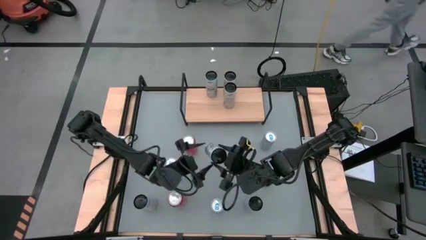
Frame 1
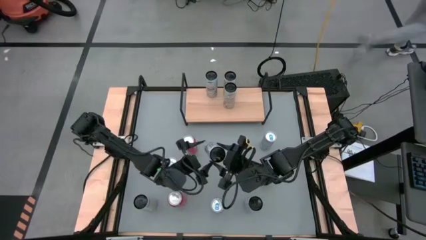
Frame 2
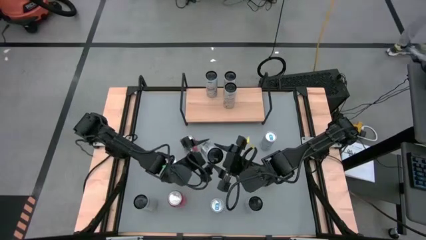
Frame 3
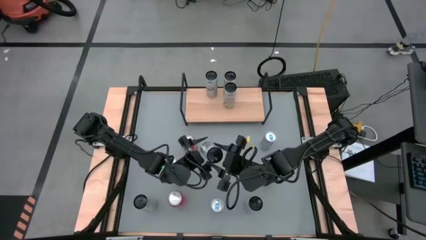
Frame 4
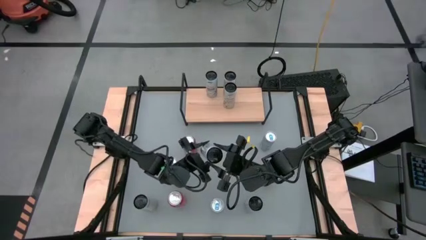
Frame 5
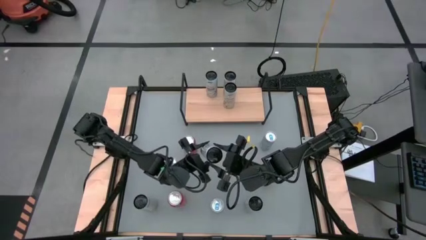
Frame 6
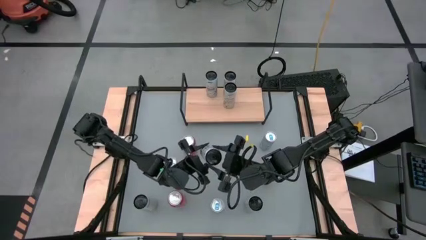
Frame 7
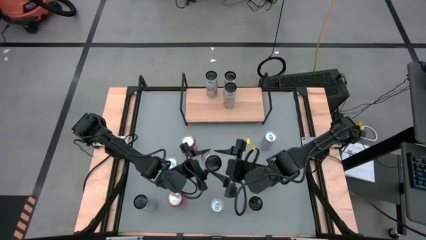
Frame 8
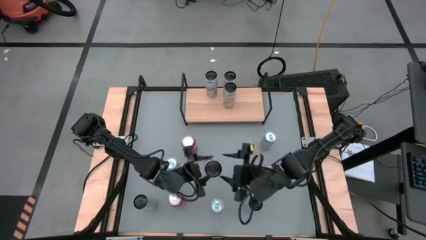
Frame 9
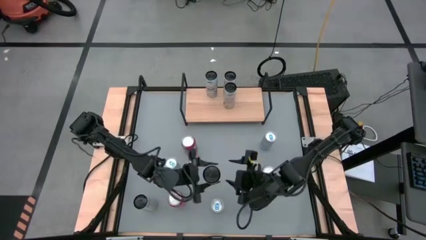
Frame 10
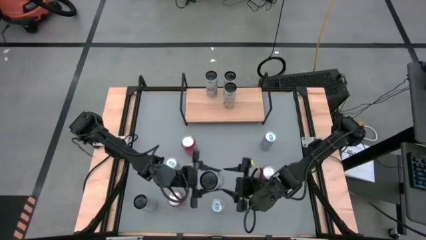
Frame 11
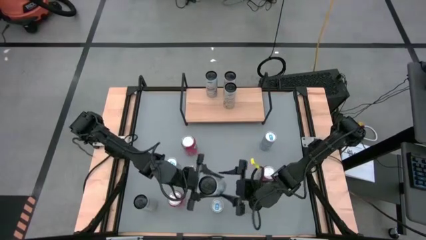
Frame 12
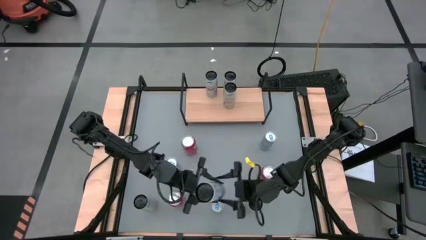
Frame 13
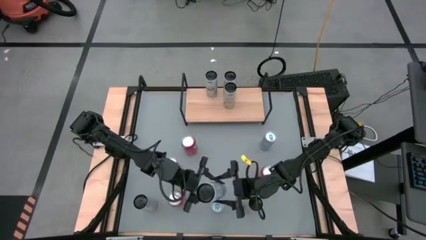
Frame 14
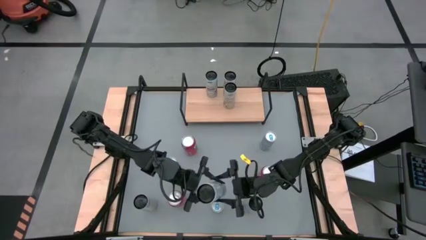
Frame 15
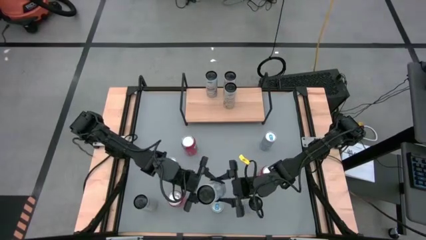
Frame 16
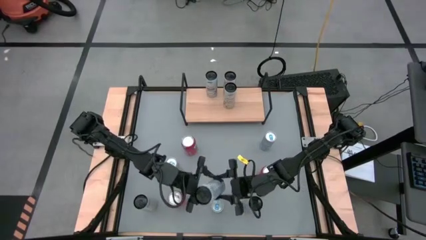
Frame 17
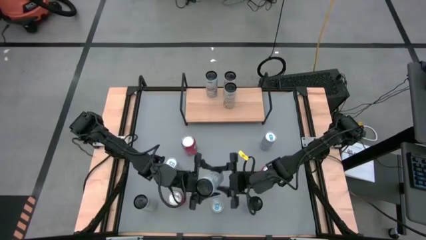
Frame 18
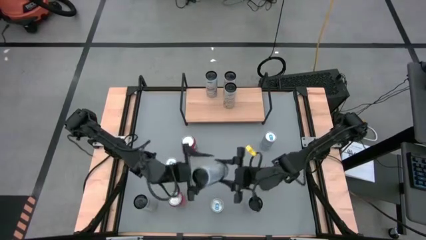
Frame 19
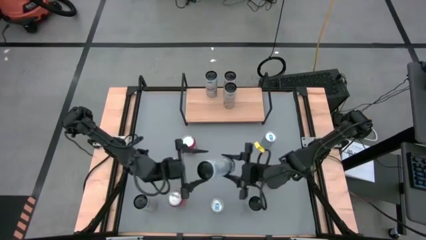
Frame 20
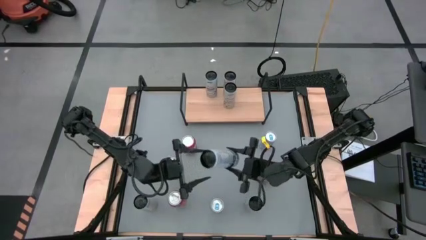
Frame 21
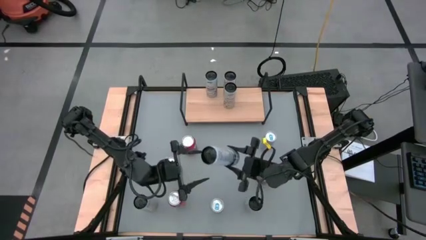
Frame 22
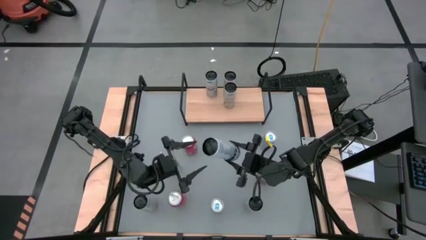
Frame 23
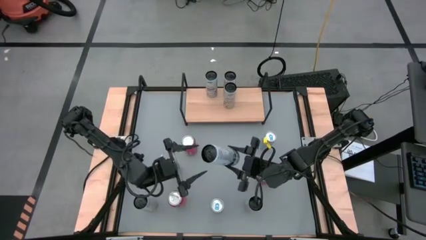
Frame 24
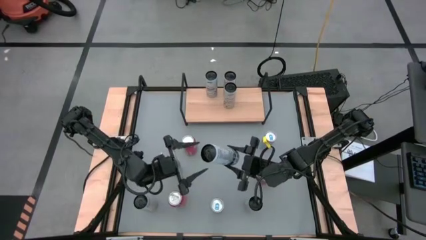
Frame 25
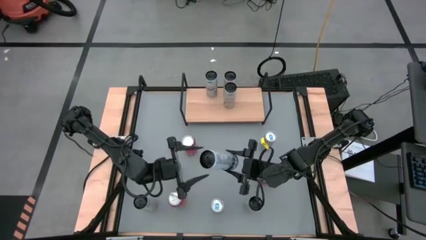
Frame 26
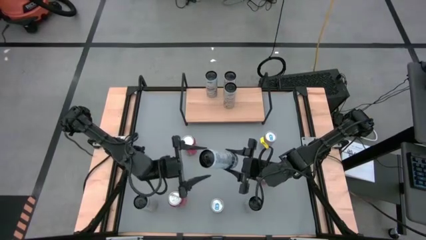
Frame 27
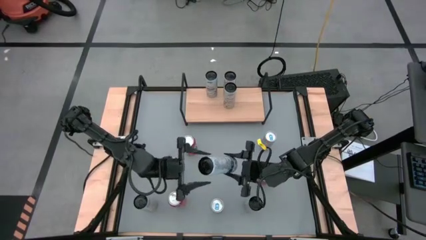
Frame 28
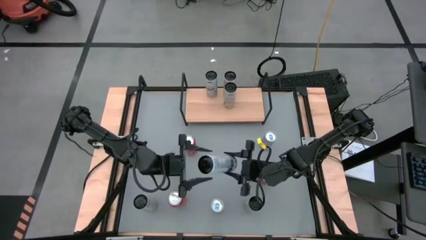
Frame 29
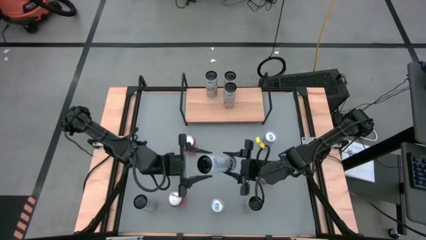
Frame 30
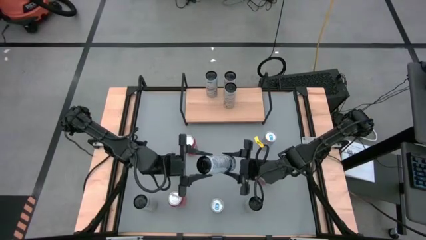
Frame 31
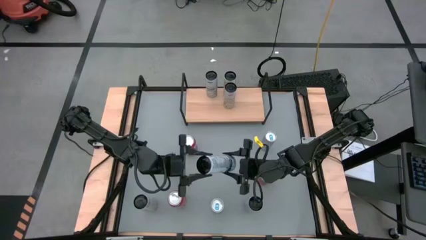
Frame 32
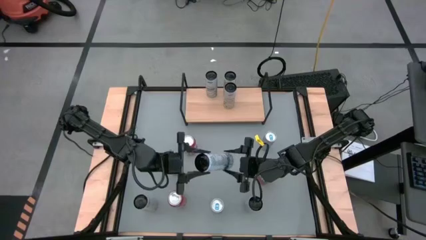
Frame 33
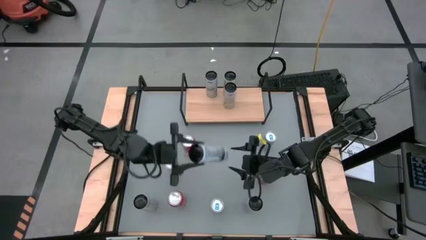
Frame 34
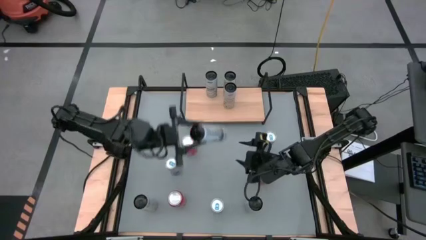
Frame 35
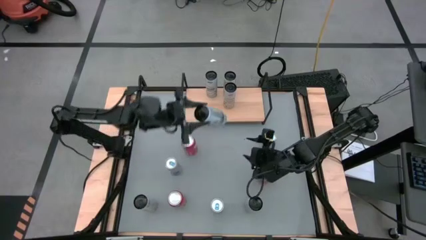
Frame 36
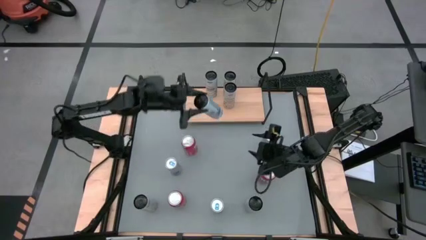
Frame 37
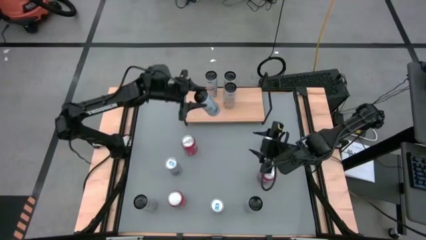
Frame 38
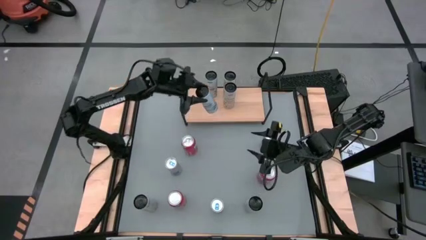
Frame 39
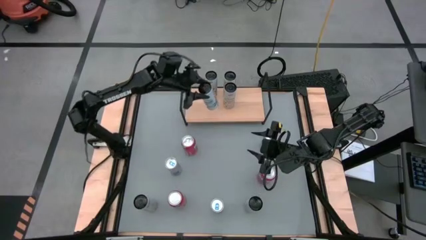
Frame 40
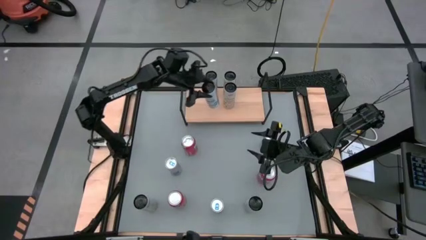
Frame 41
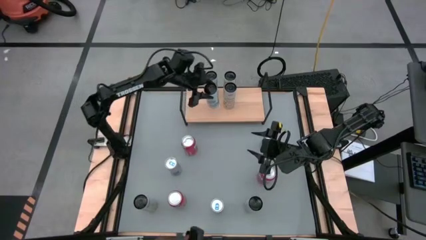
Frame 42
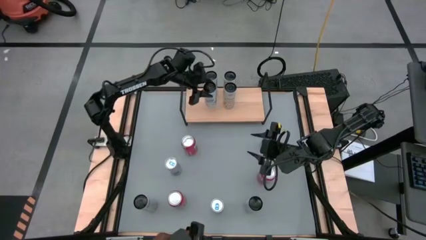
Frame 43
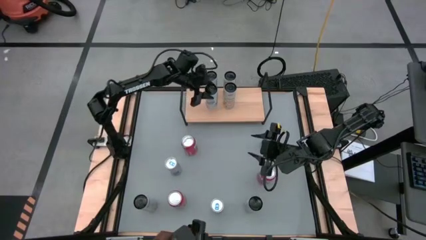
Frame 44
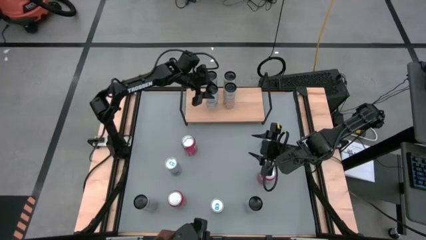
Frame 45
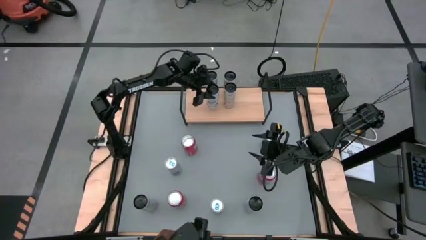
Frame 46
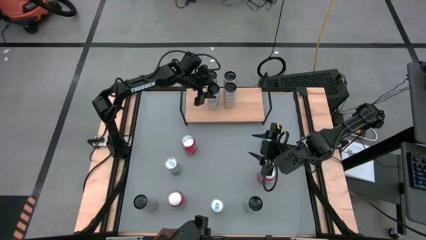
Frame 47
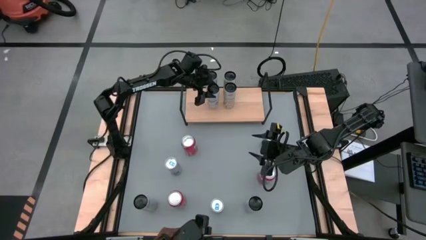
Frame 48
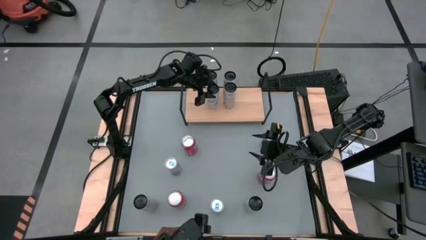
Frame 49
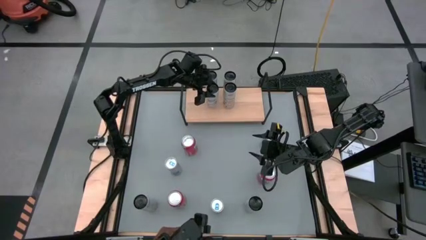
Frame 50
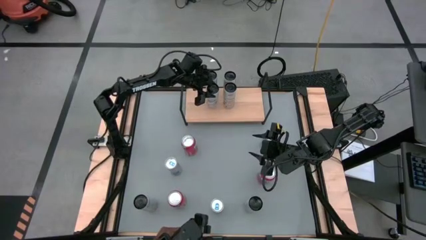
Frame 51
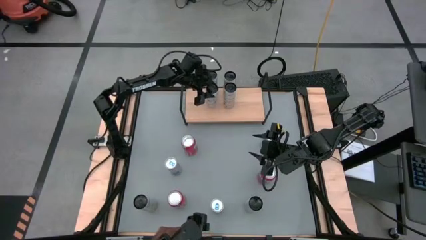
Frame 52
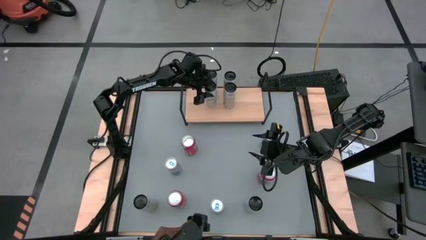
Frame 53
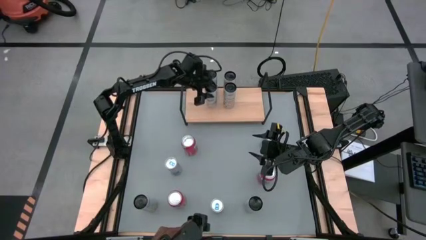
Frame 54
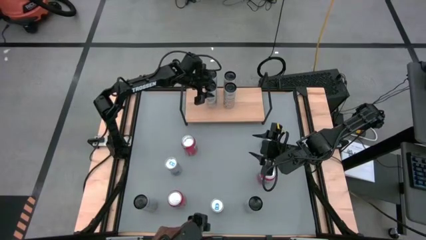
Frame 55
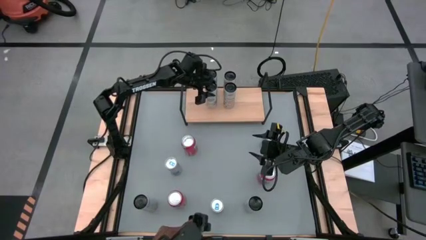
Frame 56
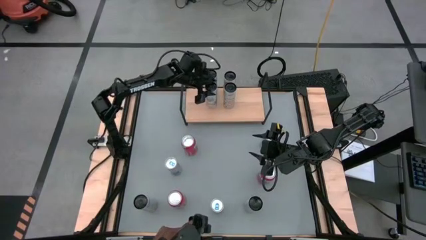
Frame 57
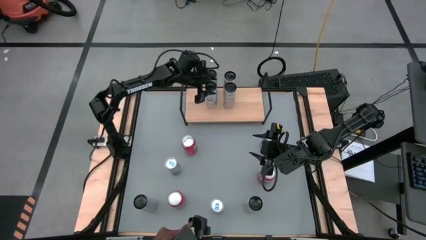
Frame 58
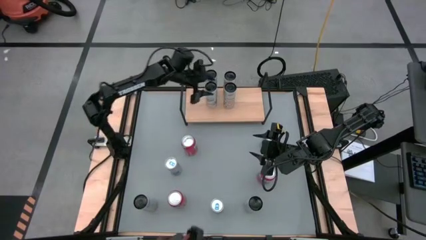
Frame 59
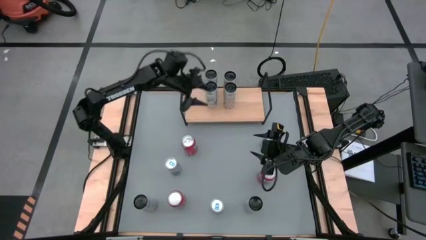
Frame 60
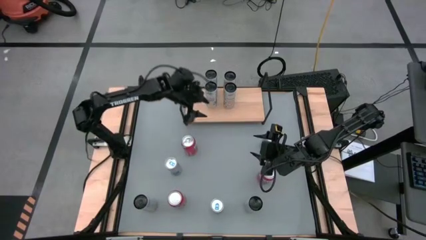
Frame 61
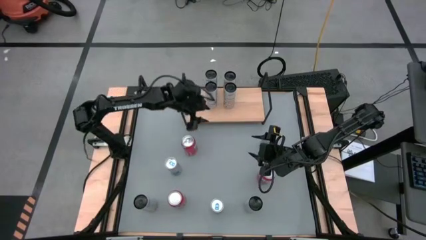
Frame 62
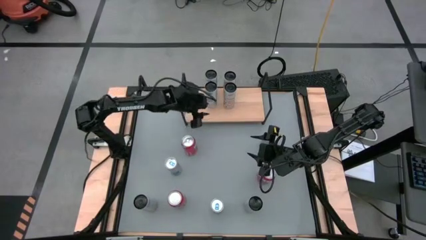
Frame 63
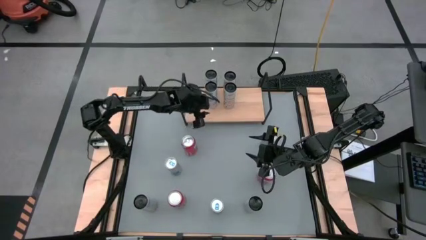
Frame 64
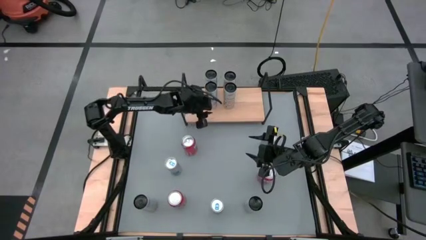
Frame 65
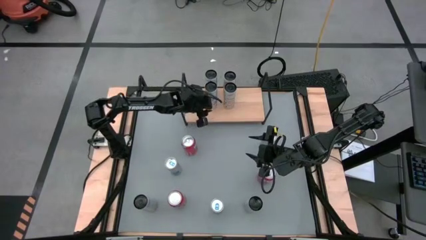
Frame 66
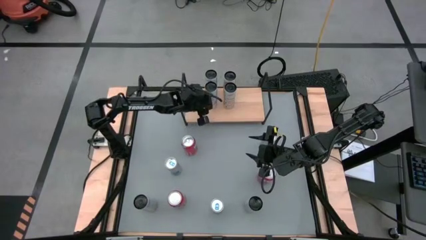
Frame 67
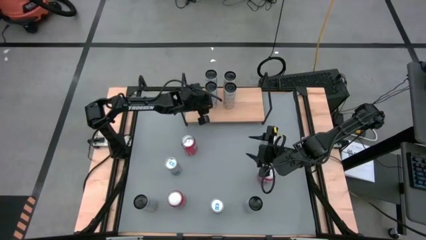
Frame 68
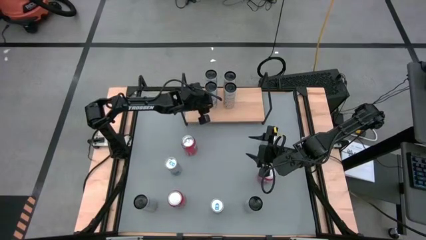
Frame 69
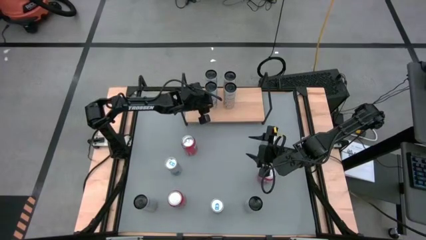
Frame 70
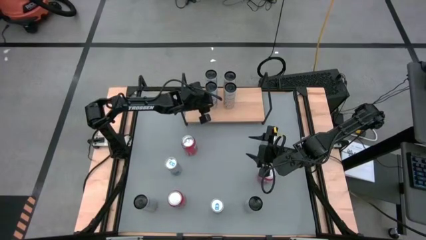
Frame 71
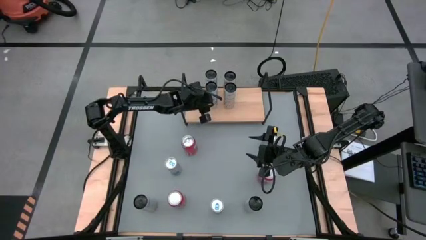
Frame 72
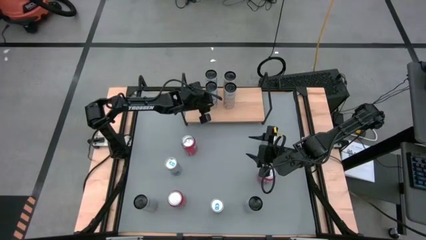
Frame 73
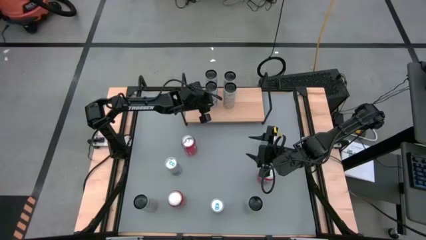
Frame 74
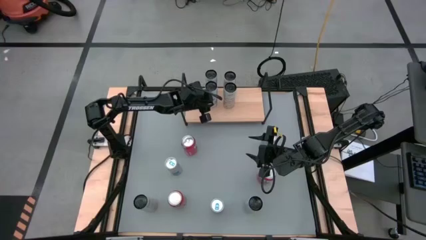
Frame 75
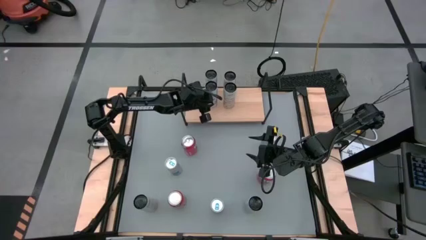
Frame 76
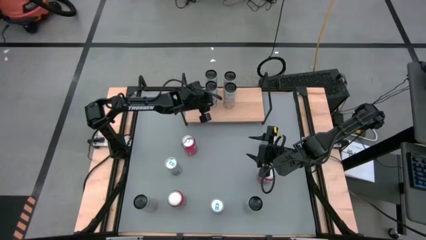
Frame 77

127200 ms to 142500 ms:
Task: Place canned beverage on shelf
Put the right white blue soda can aligned with the other white blue soda can on the shelf
